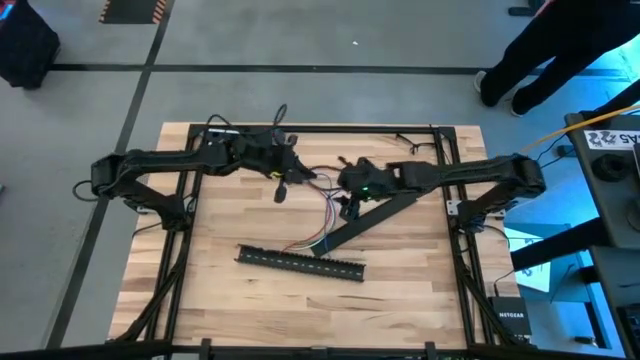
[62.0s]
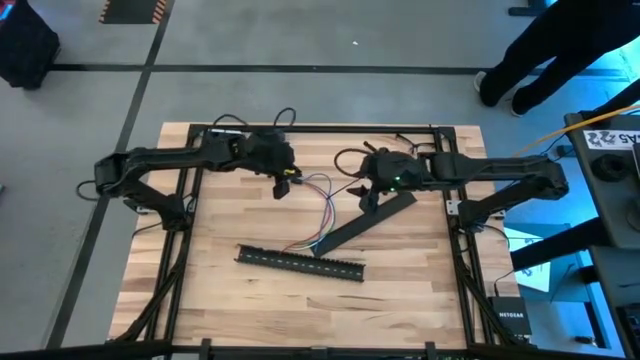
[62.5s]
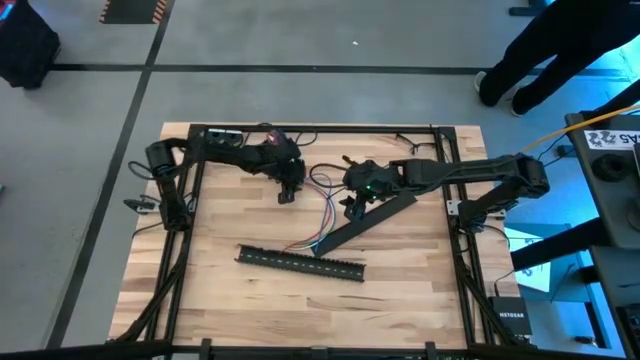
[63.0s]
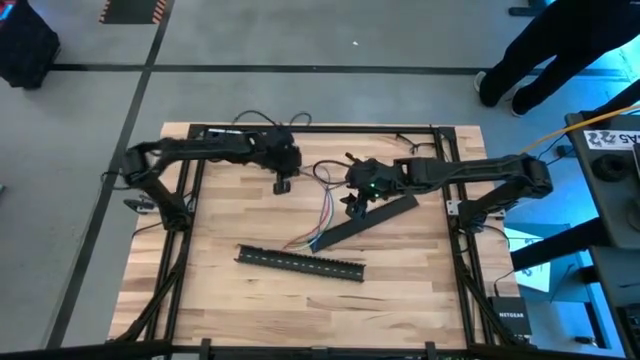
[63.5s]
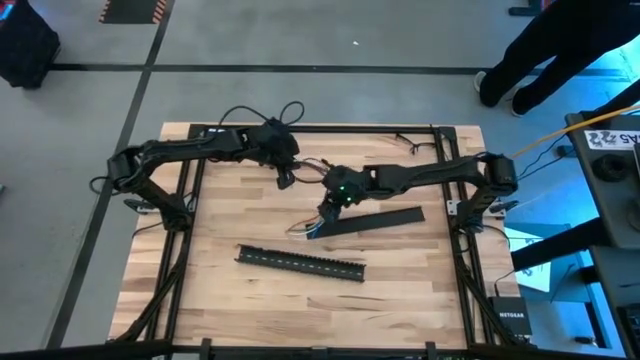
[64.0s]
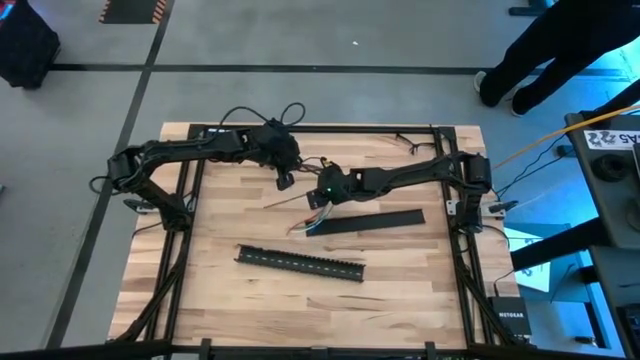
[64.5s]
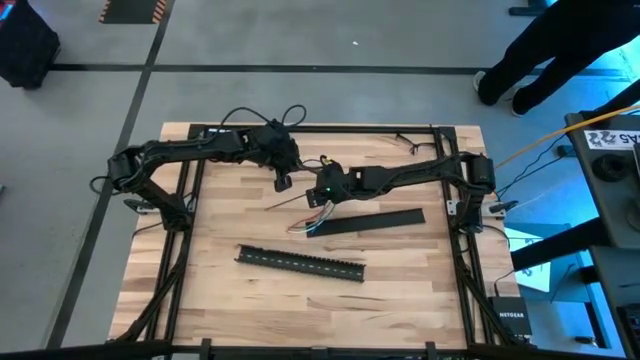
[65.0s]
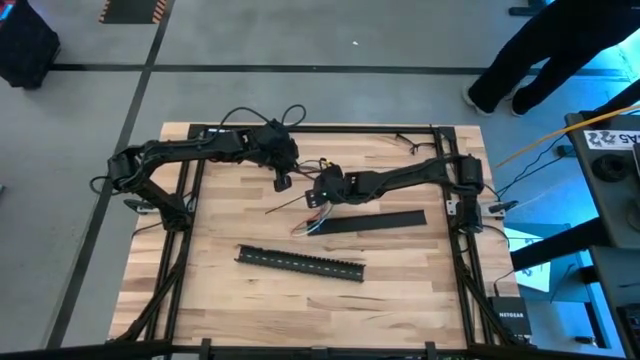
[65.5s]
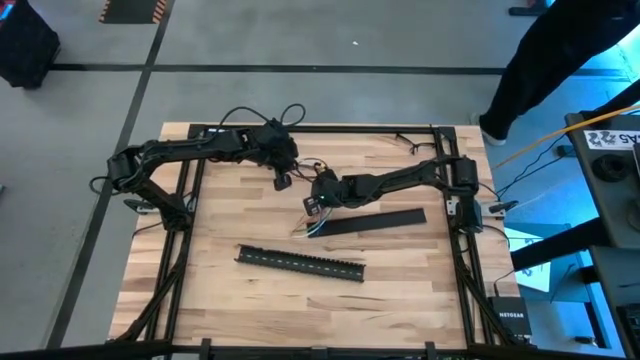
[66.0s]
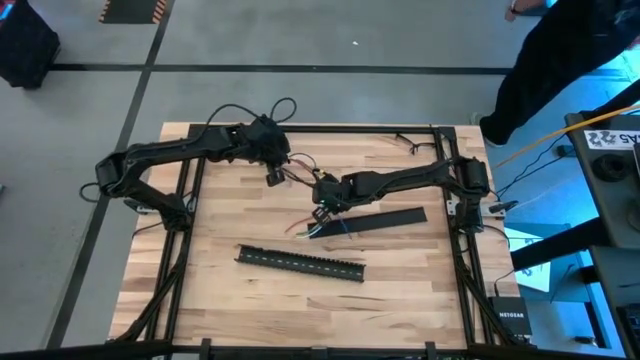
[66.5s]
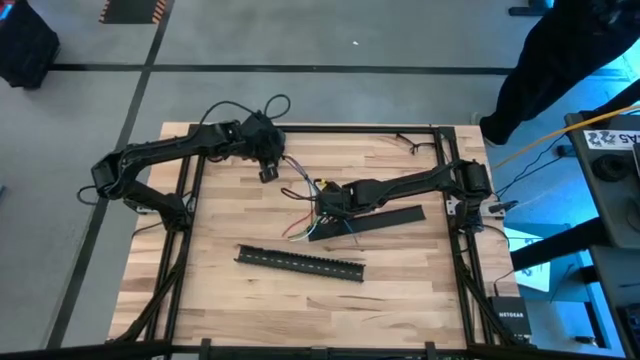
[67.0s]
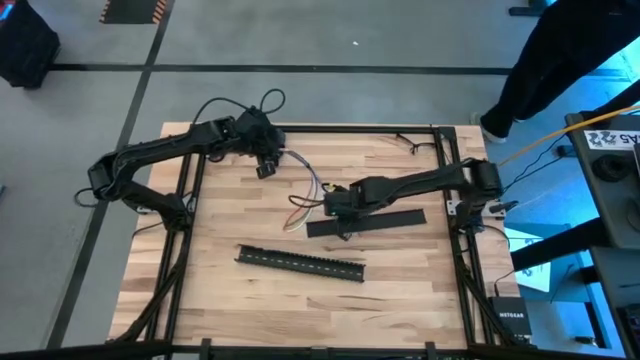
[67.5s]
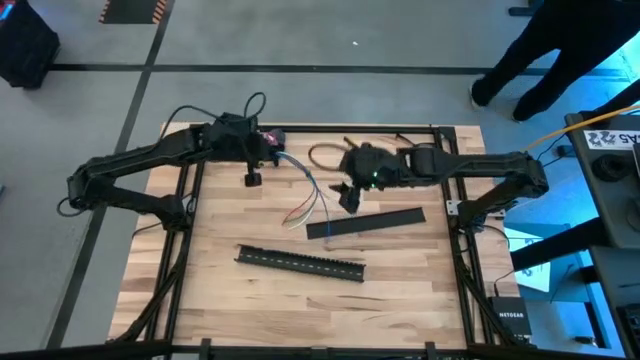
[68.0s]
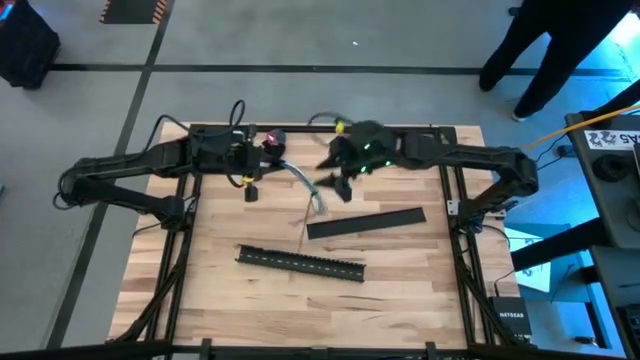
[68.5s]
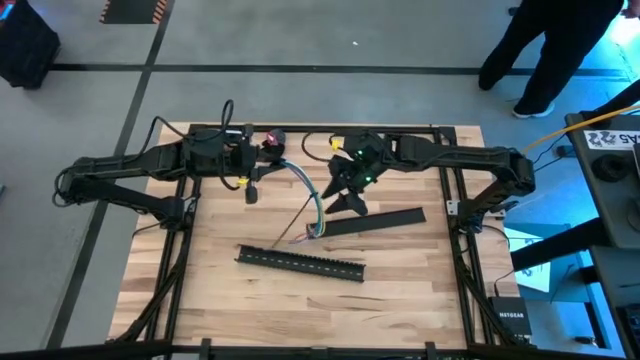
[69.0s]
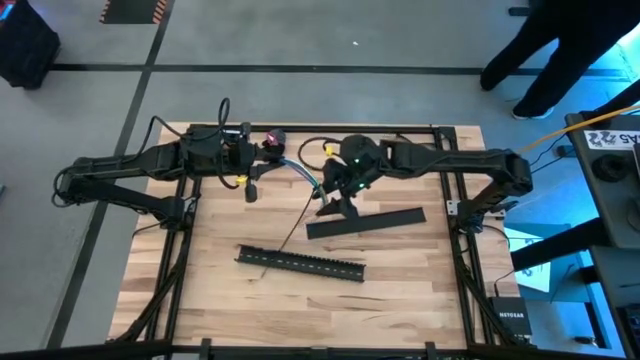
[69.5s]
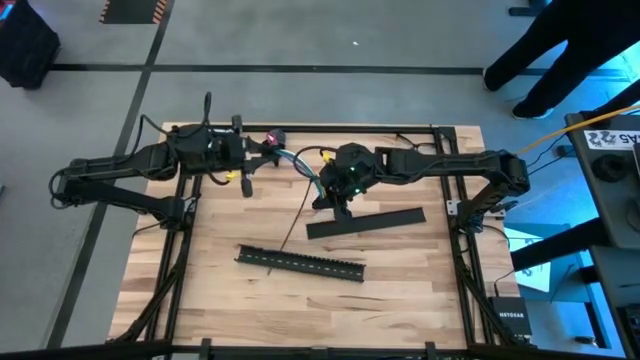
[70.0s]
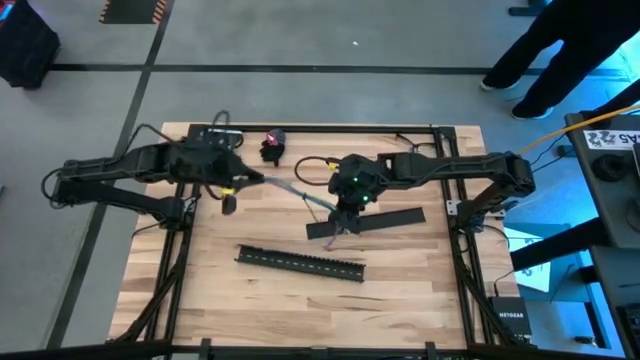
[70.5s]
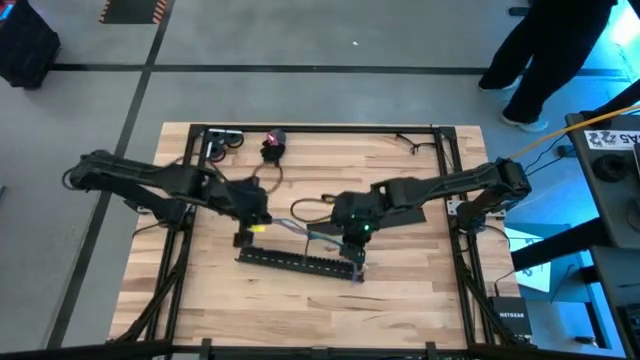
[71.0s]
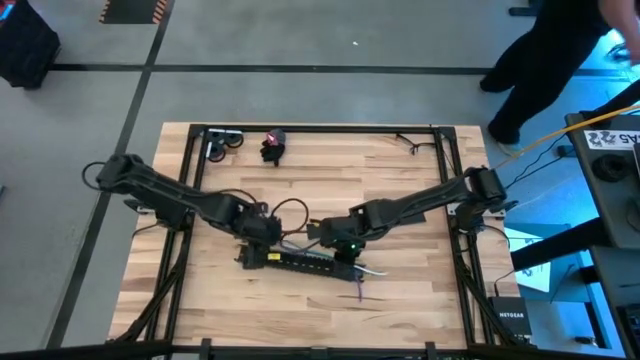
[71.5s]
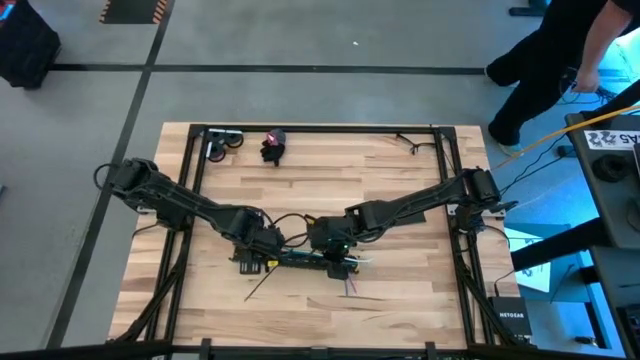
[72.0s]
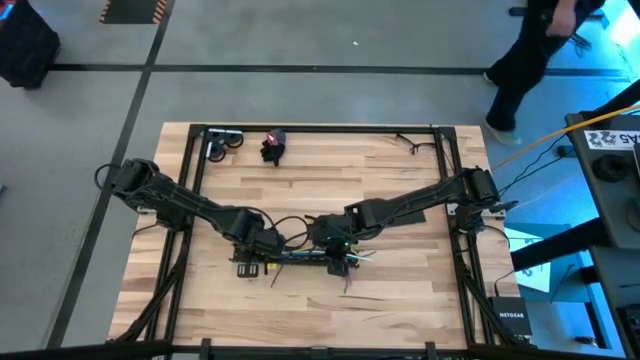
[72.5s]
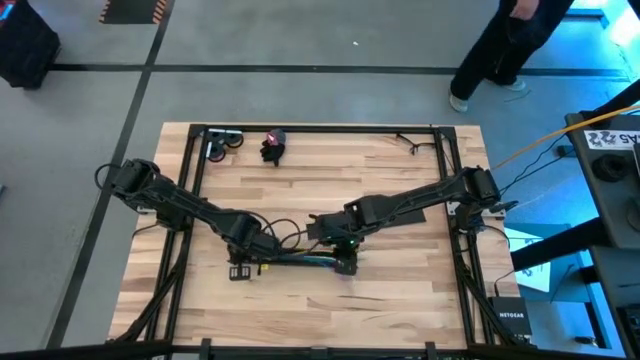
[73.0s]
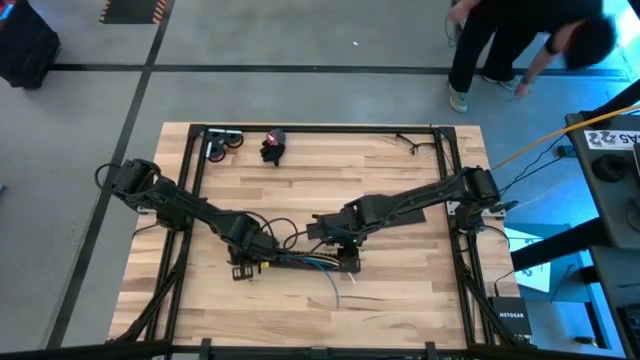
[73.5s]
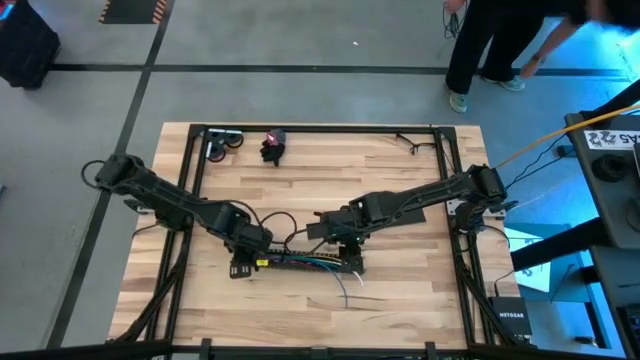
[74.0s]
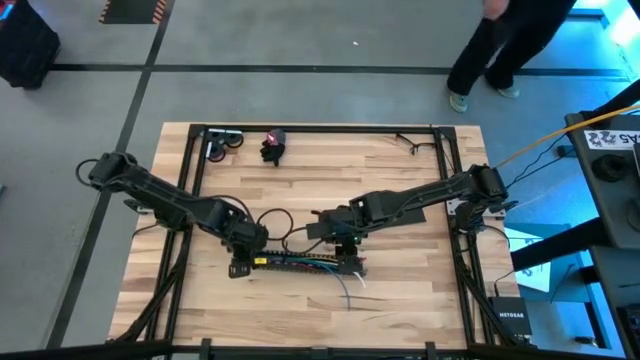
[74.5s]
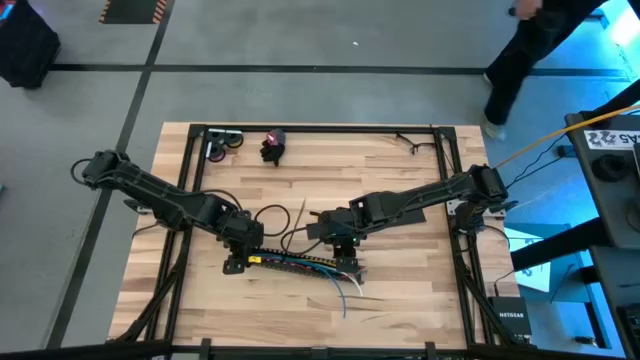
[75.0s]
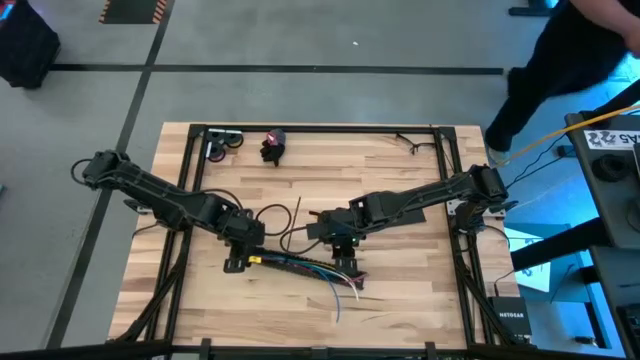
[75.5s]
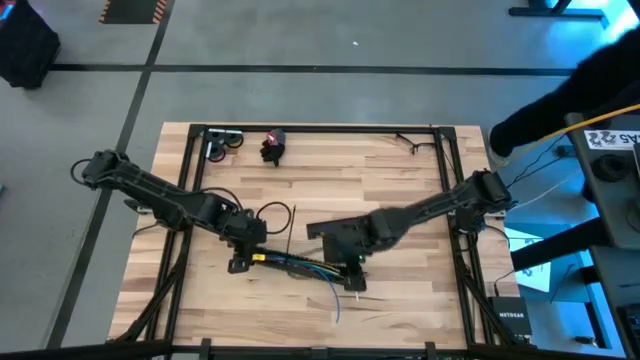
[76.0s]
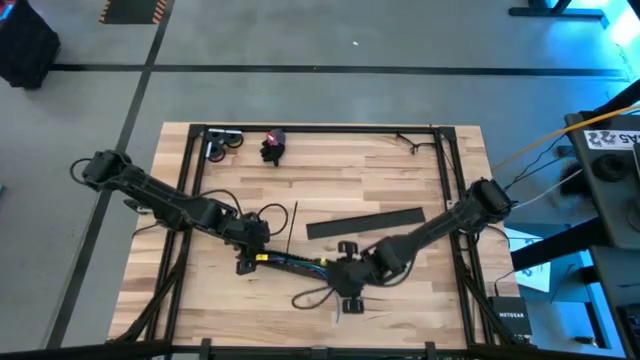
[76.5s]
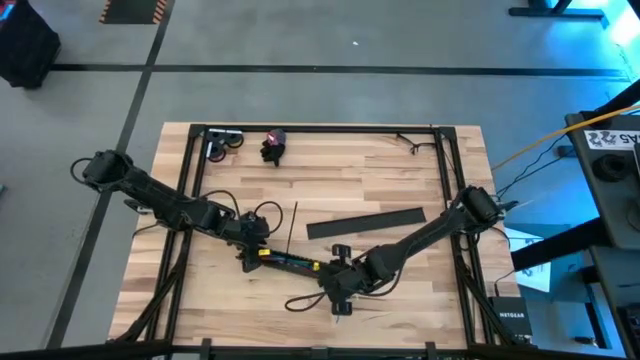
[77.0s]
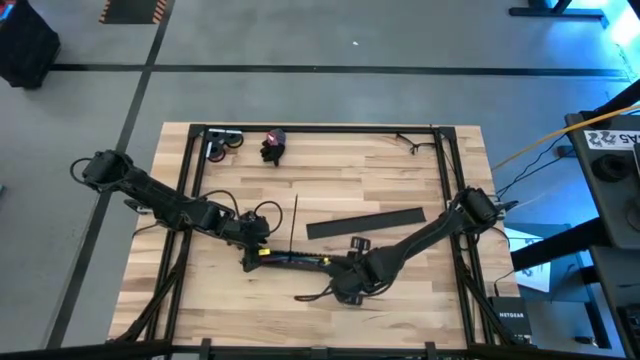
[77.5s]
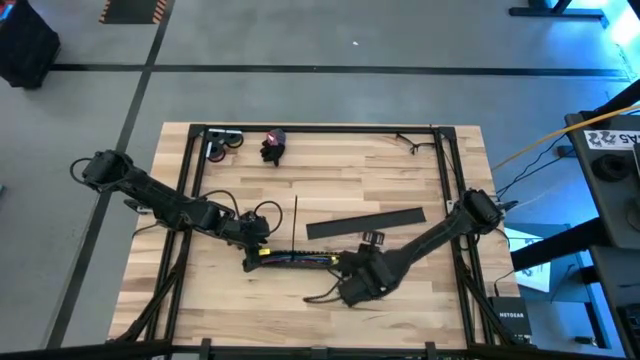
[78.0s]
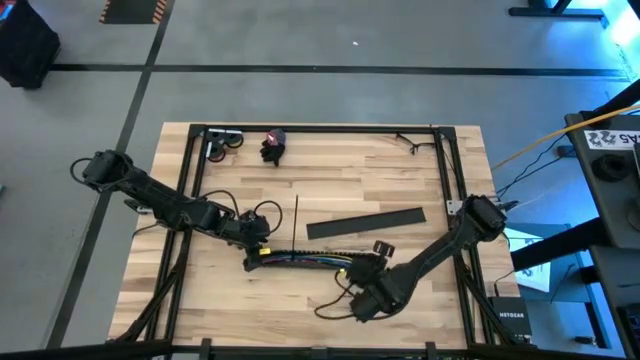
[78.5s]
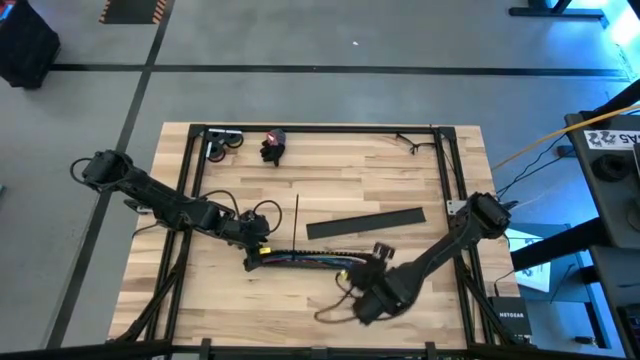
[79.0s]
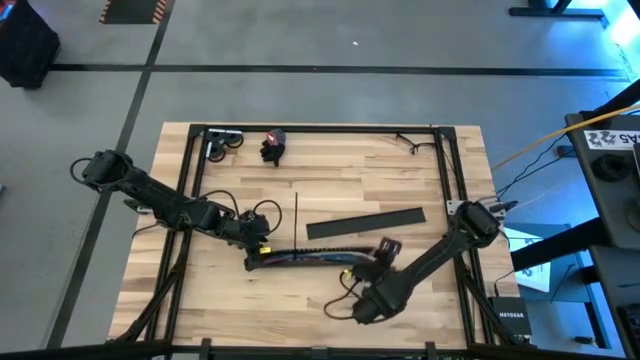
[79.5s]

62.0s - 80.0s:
Task: Ziptie cables
Put the cable wires into the black cable duct

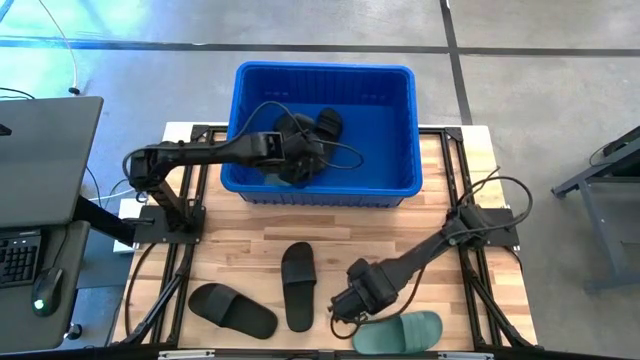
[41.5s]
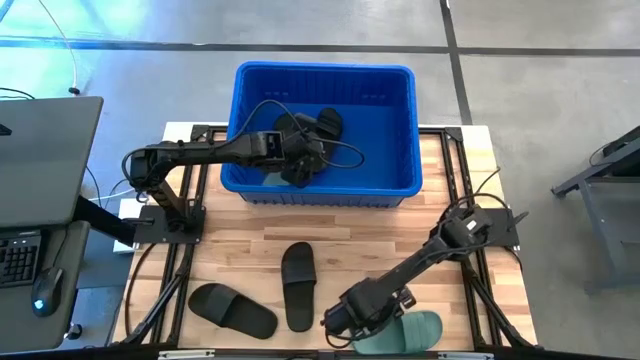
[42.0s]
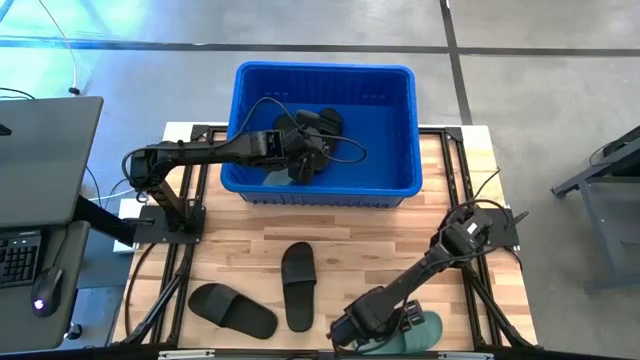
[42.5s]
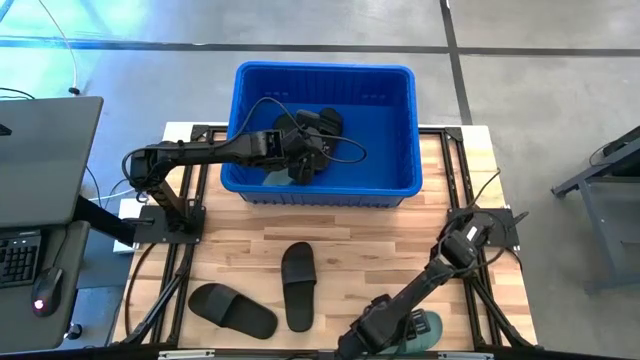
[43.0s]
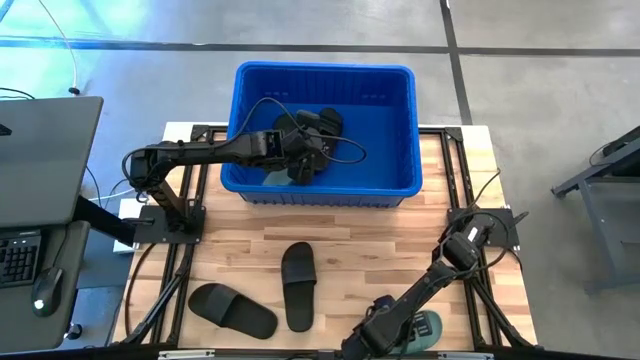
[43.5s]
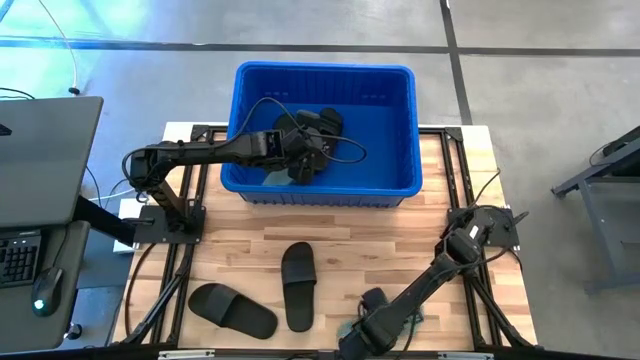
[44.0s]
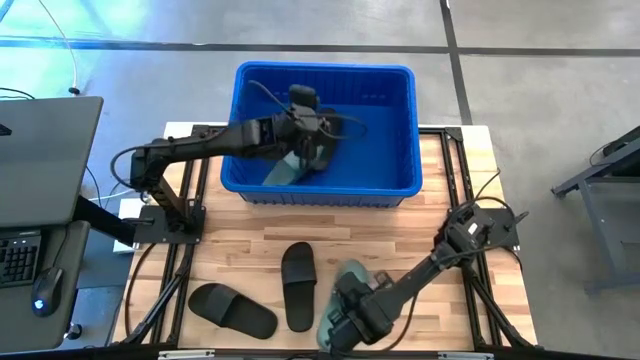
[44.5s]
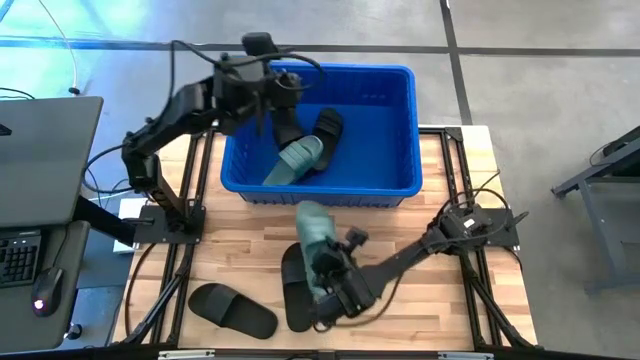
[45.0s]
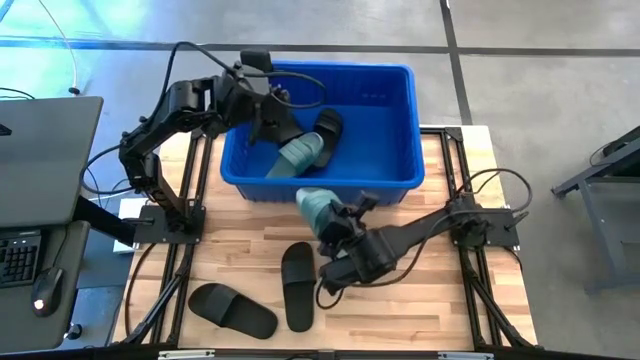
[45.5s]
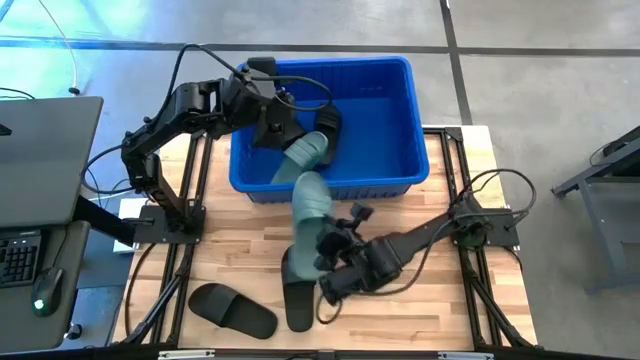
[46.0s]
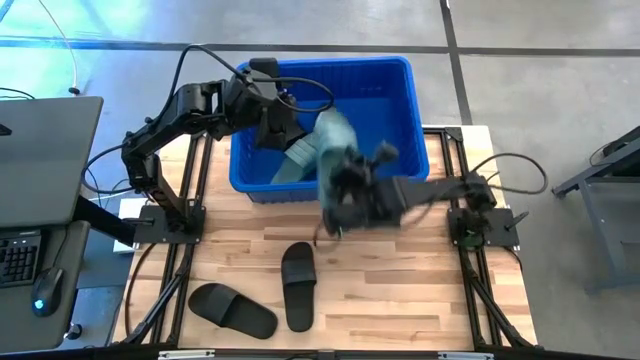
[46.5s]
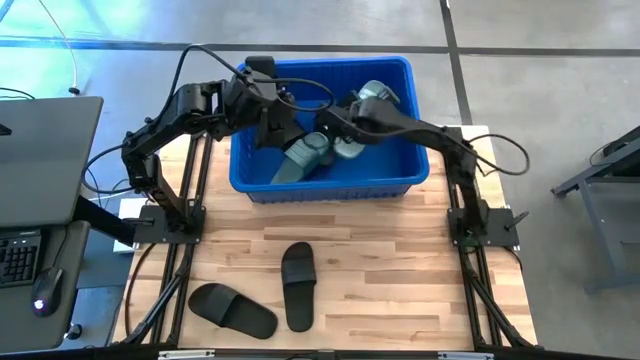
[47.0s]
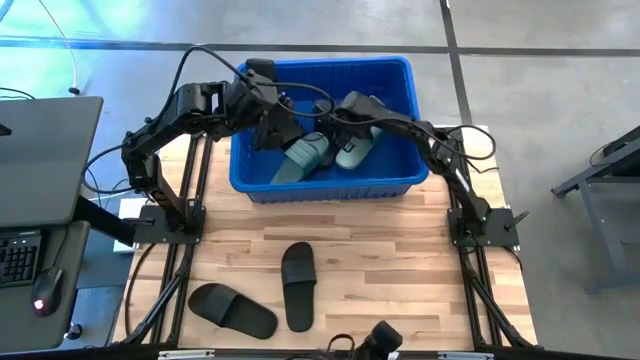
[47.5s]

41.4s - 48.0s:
Task: Pick and place slides into bin
Put the green slide into the blue bin
